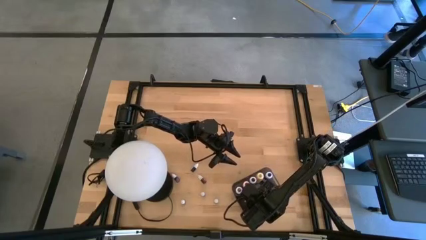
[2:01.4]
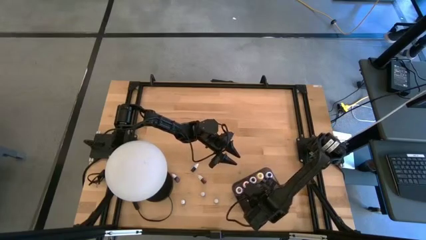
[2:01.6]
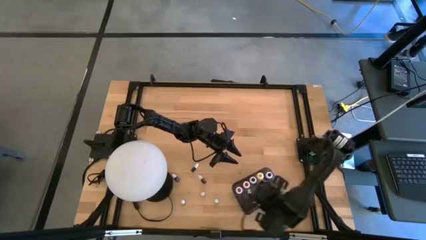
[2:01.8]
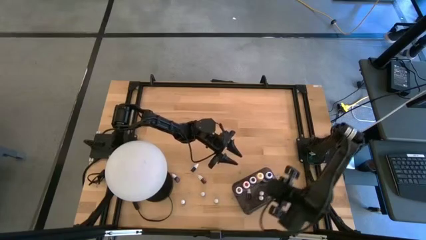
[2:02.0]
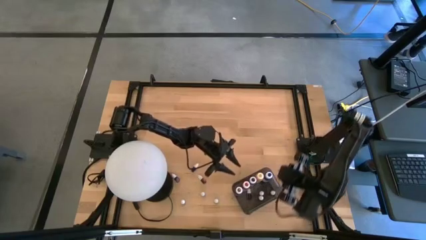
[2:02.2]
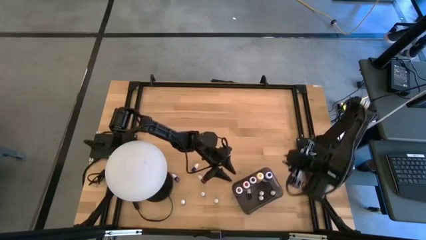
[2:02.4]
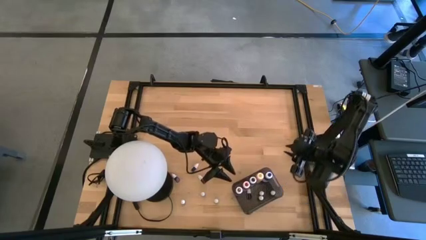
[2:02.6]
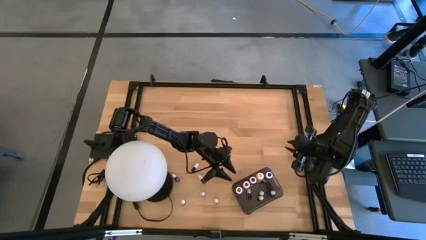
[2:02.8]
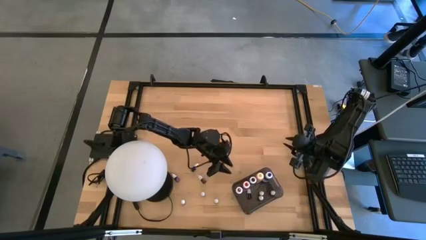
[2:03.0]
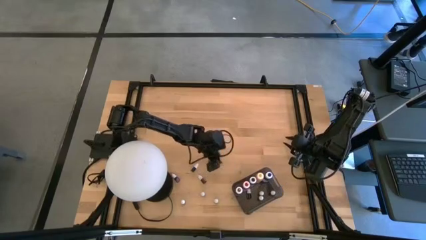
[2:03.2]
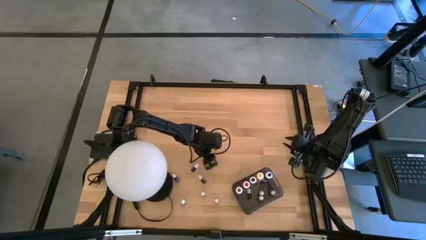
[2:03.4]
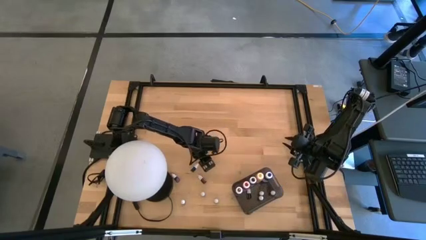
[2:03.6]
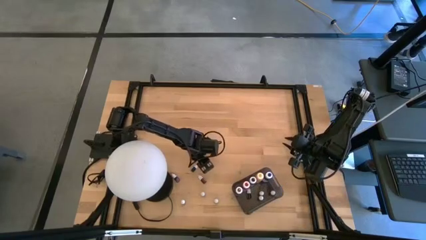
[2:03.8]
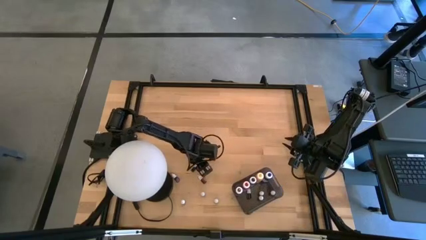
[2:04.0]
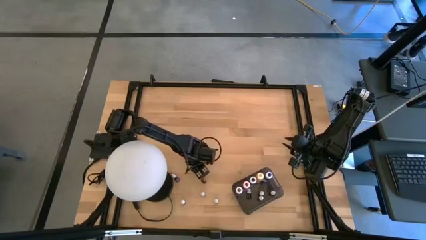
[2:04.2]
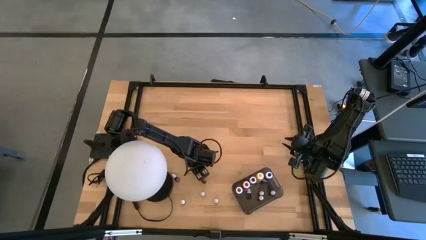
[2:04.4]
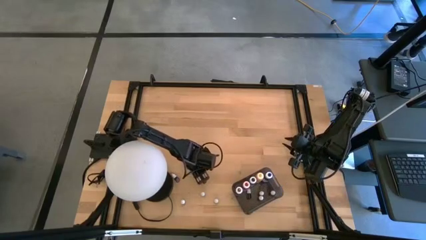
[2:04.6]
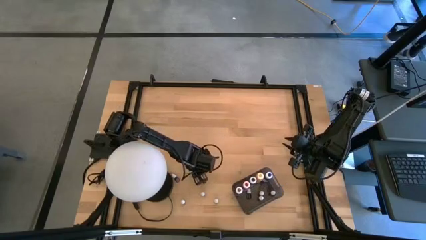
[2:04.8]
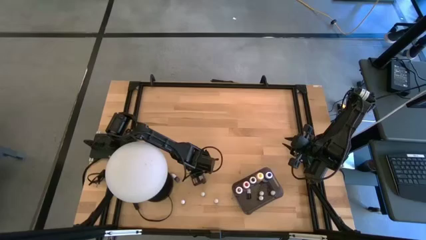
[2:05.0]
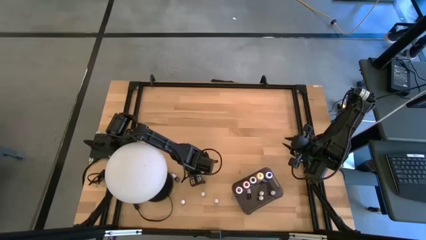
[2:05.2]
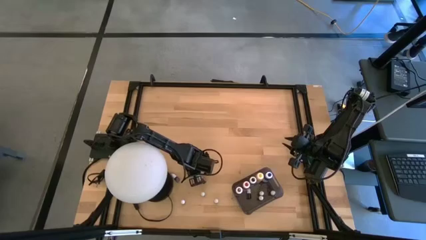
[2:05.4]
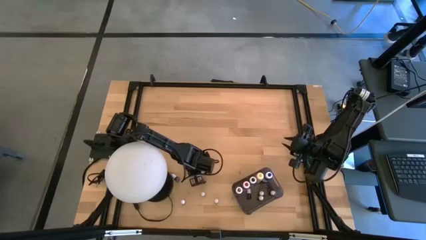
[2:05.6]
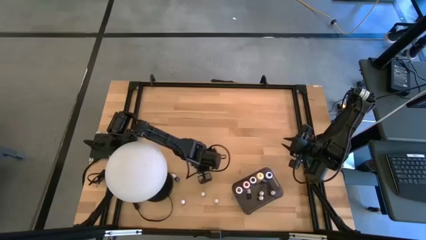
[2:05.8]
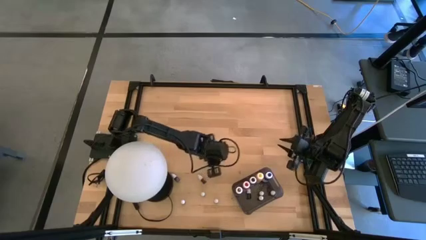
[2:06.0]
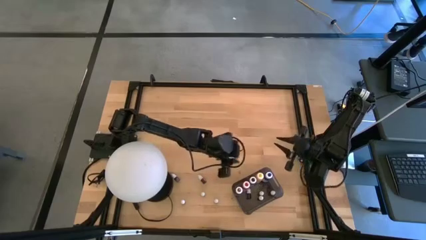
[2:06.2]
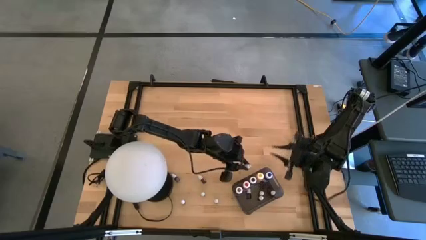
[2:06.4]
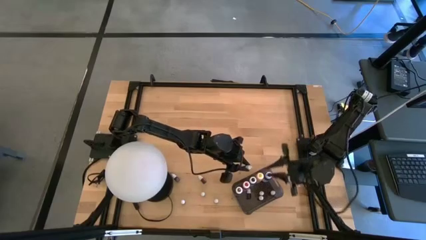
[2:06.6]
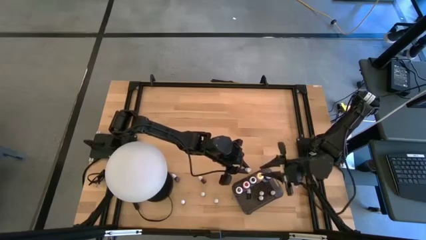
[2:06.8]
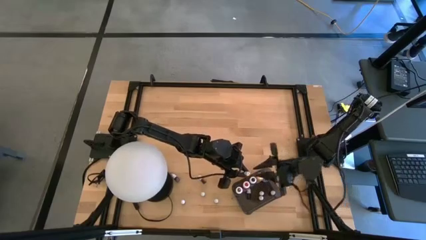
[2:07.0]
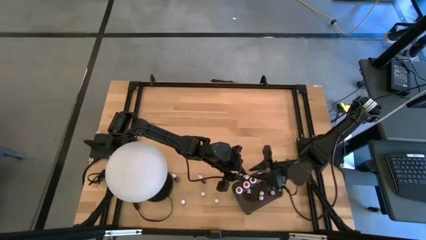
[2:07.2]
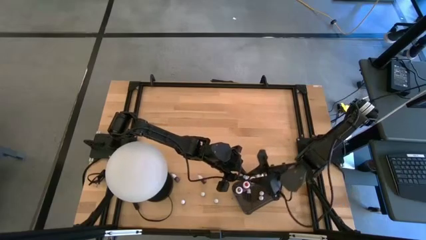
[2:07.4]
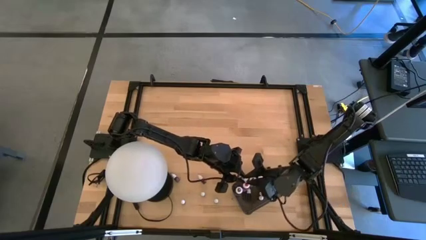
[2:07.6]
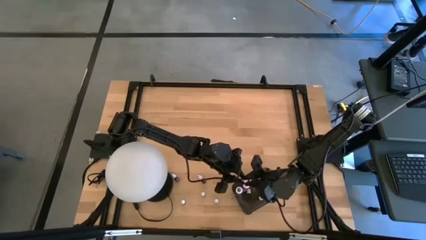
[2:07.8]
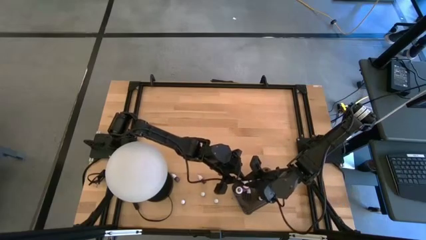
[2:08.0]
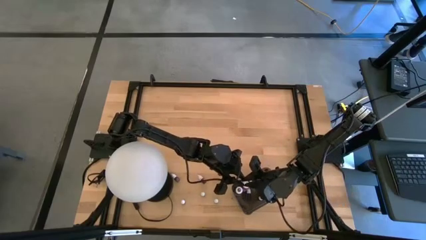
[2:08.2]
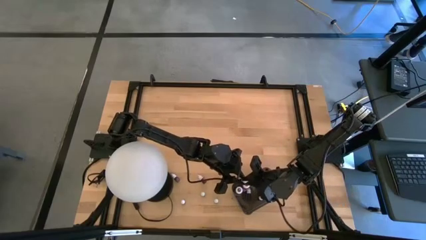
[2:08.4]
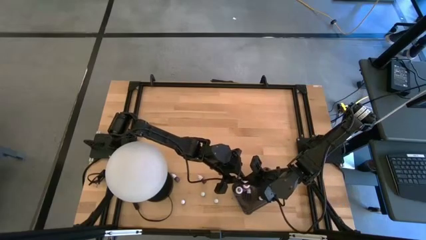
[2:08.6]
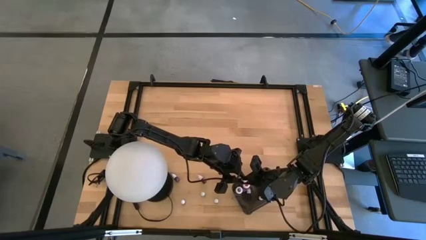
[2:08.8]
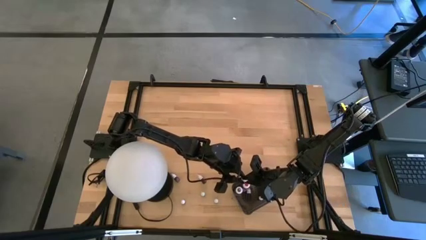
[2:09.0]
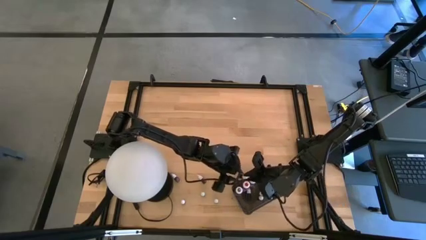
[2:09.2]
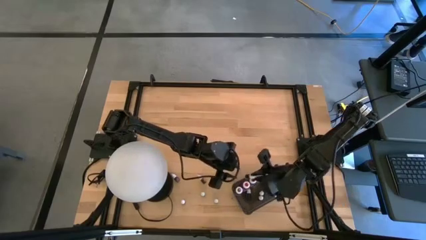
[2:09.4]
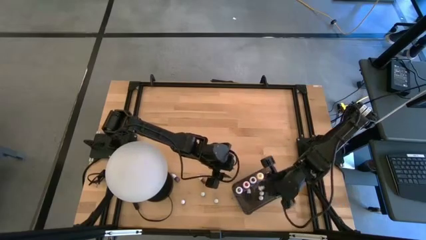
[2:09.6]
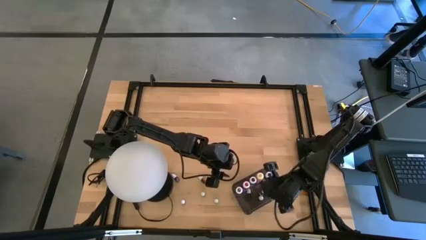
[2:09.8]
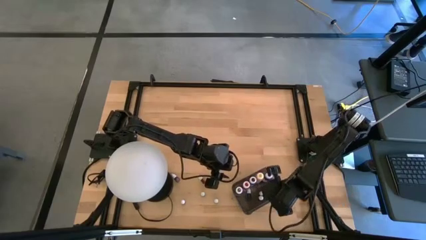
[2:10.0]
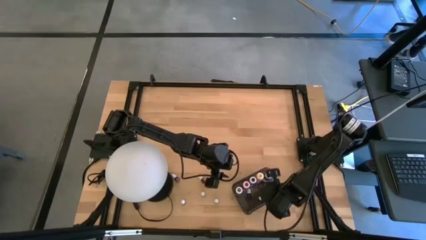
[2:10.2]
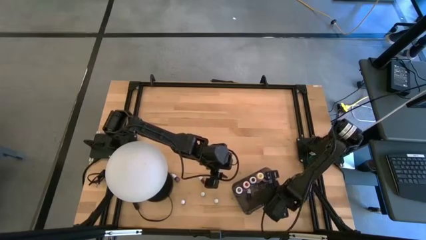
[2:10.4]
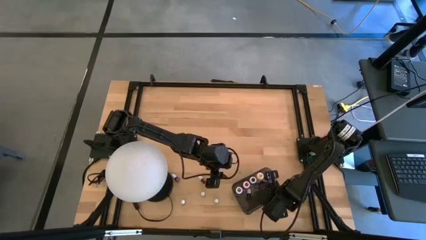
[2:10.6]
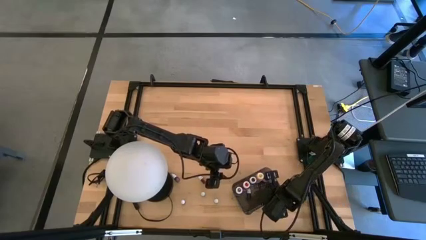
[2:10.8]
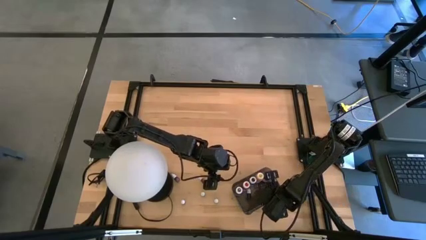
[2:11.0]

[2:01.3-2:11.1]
Task: Pick & Place food coloring
Put the small black food coloring bottle into the bin

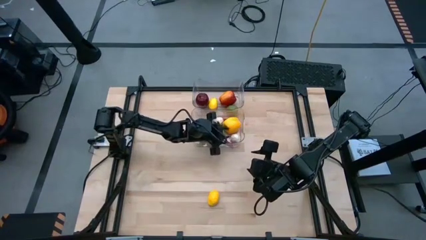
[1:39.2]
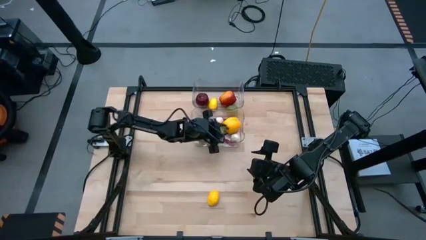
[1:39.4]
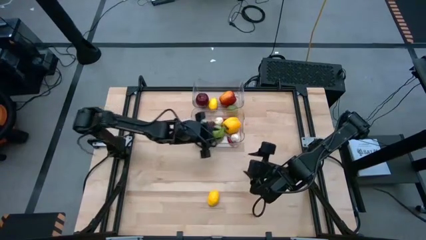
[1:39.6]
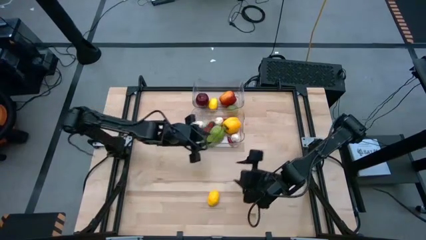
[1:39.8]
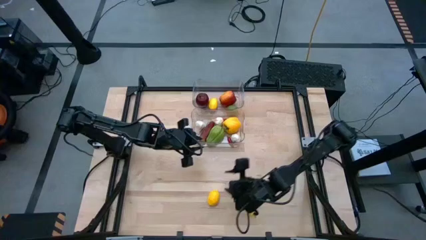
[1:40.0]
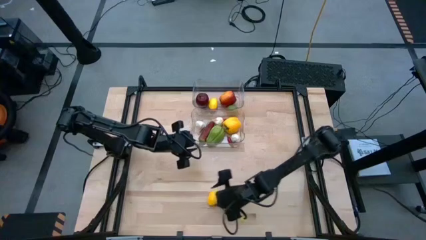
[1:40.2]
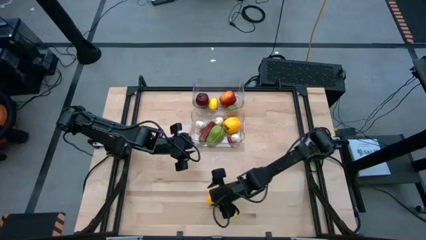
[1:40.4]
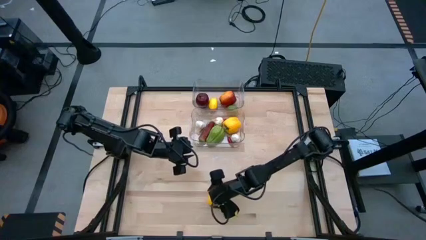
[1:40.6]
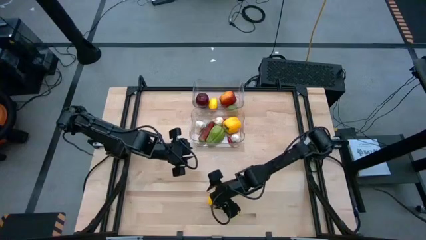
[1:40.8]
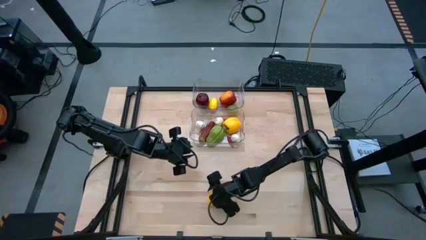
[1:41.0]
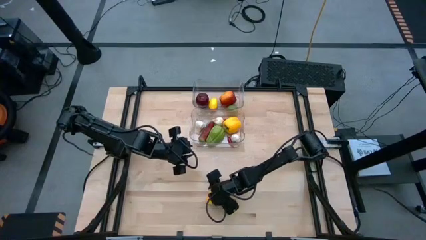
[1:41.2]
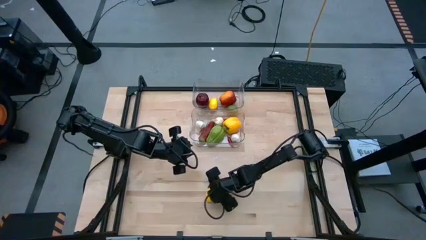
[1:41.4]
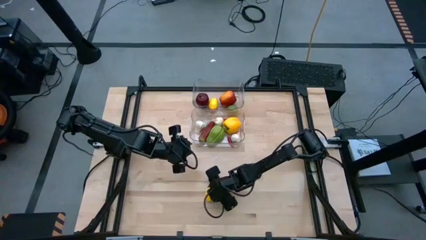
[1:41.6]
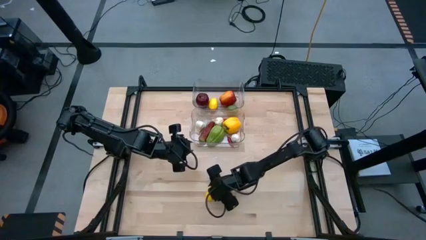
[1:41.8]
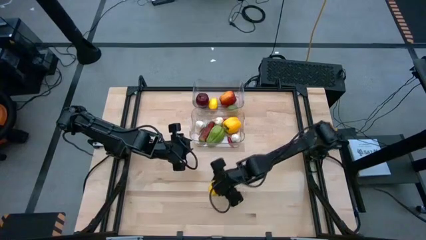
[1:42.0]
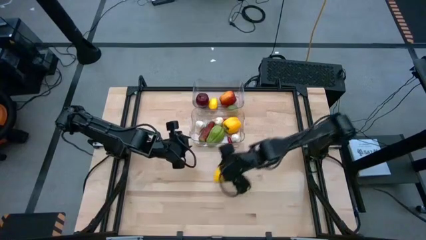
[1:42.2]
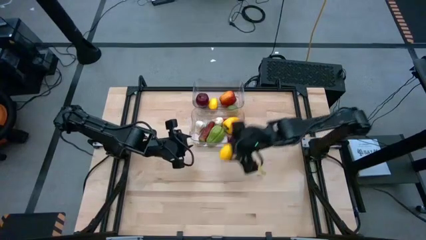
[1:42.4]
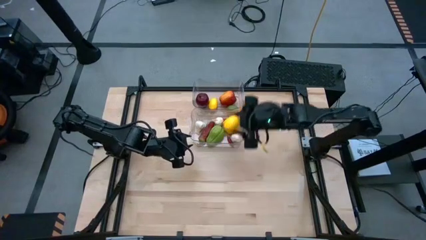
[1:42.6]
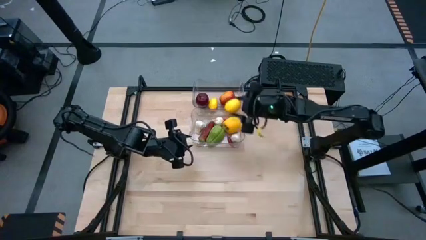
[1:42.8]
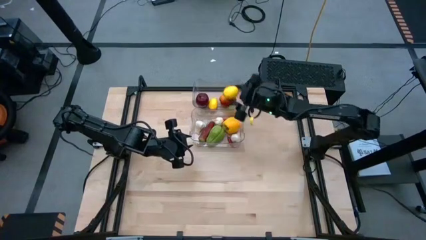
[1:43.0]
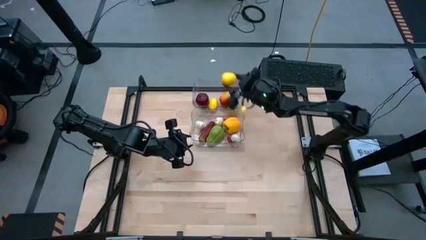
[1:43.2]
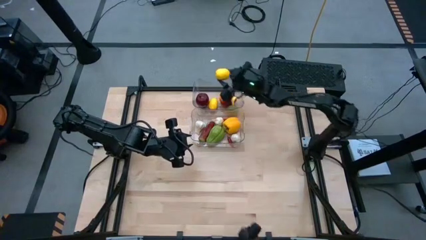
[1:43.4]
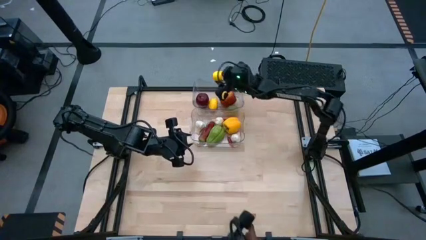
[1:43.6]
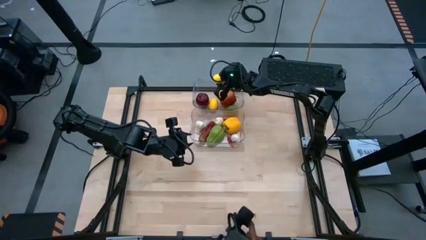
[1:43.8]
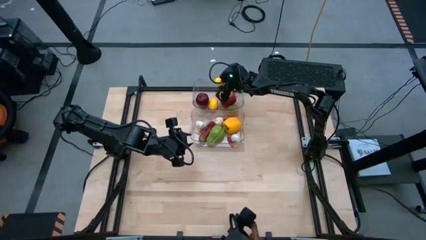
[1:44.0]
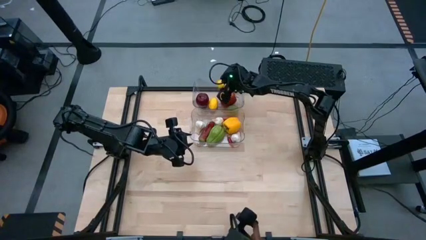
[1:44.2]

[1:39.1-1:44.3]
Task: Sort produce into baskets
Put the lemon into the top transparent bin

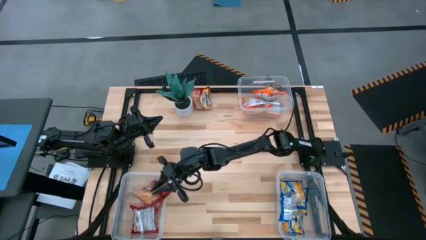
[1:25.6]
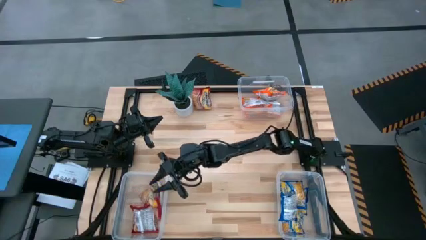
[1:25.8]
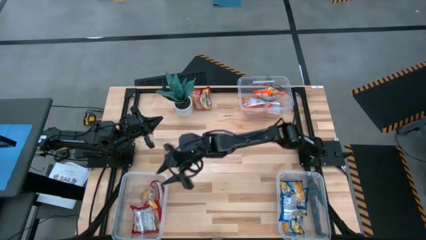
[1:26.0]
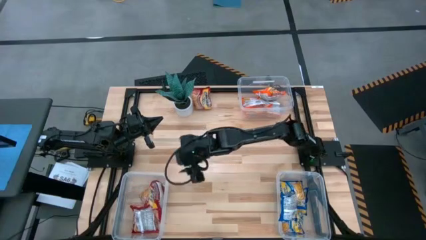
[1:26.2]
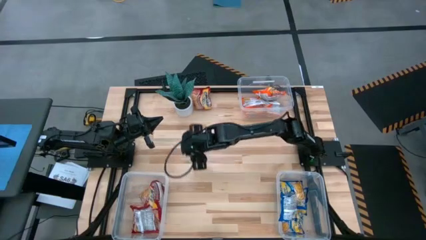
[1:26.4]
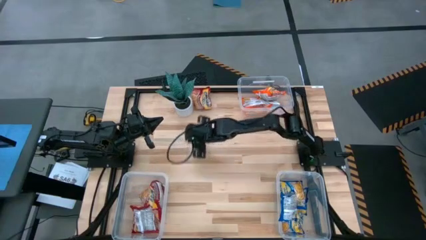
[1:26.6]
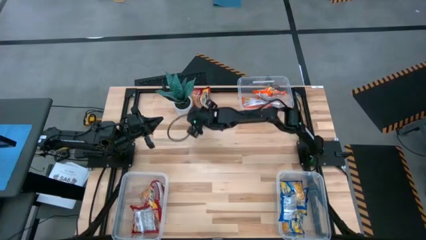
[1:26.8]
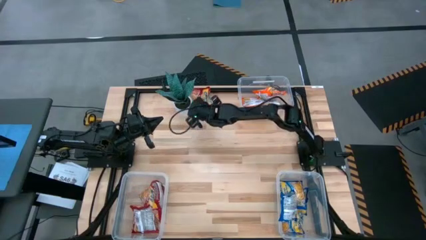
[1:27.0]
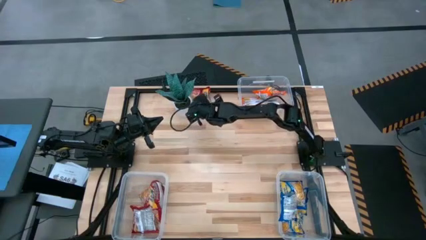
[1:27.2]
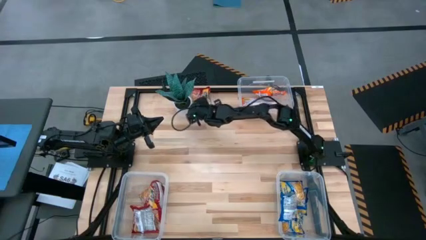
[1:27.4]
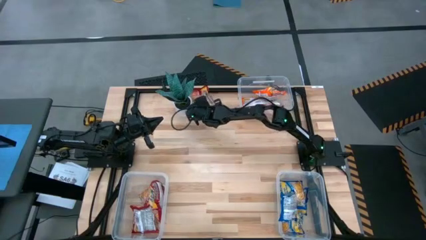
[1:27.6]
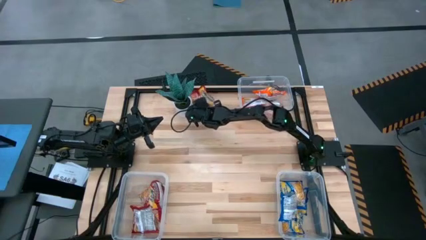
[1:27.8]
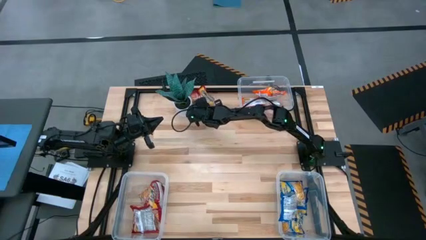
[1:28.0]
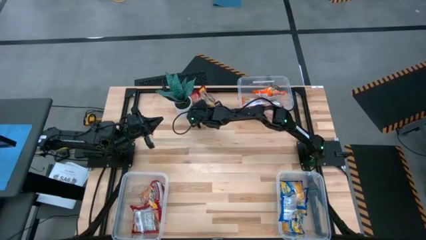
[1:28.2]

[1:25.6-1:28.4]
Task: Sort Maruchan noodles
Put the red noodle pack into the bottom left transparent bin
